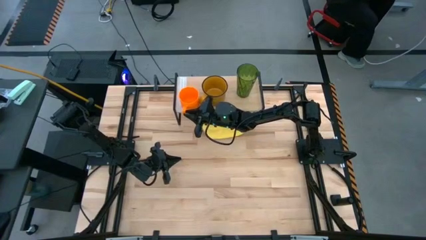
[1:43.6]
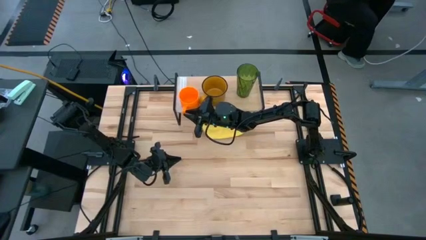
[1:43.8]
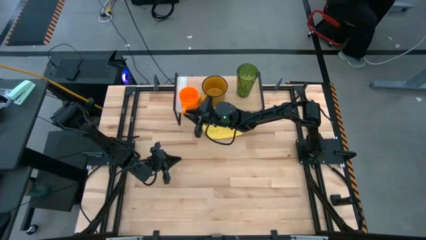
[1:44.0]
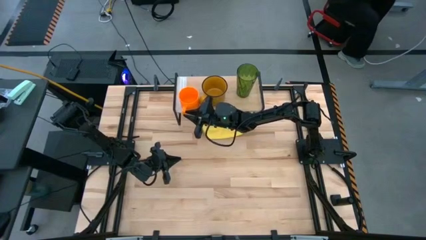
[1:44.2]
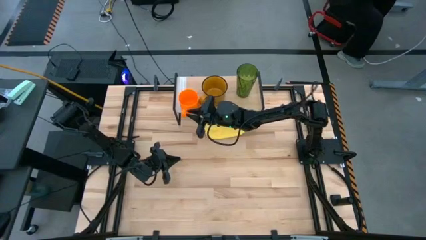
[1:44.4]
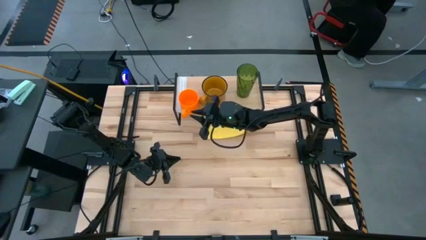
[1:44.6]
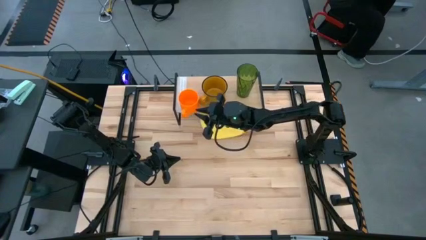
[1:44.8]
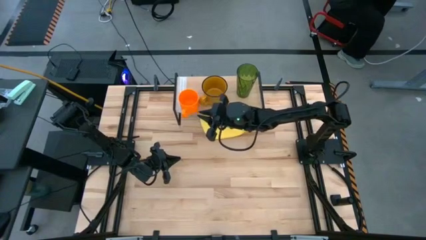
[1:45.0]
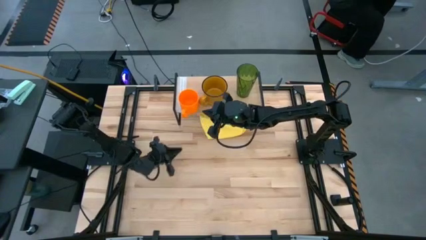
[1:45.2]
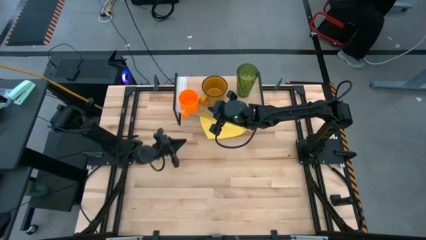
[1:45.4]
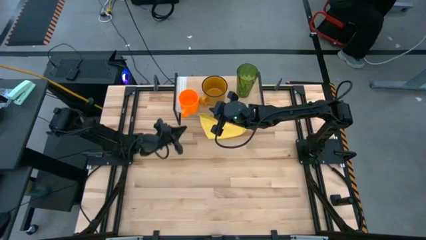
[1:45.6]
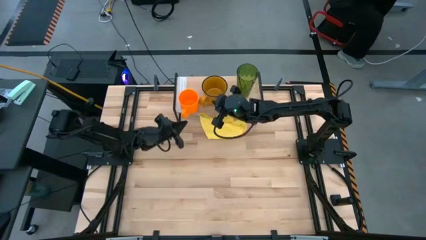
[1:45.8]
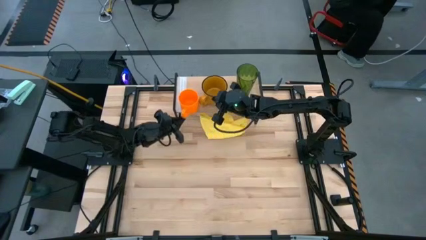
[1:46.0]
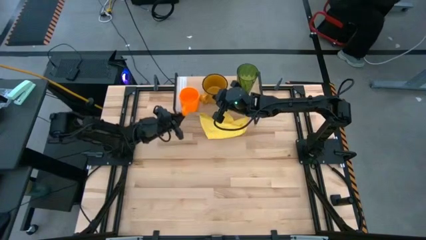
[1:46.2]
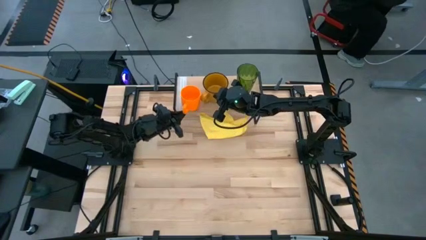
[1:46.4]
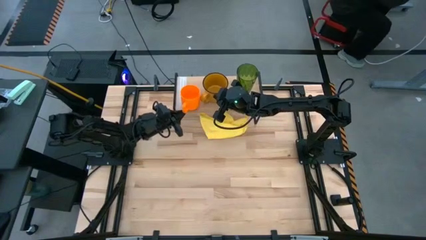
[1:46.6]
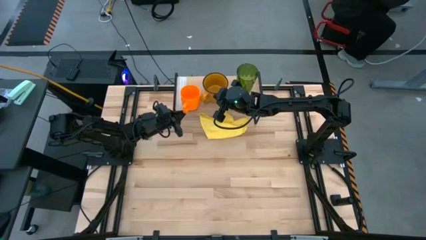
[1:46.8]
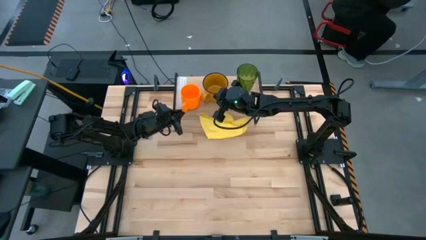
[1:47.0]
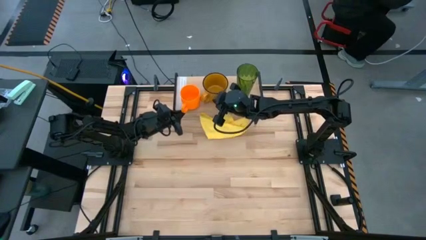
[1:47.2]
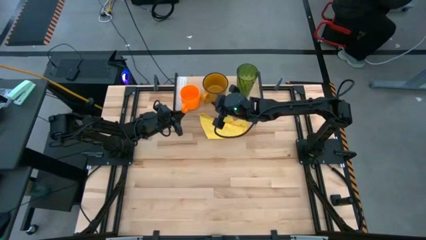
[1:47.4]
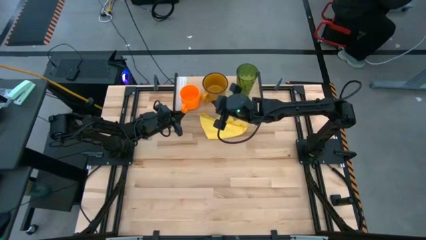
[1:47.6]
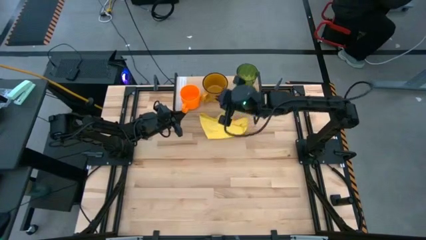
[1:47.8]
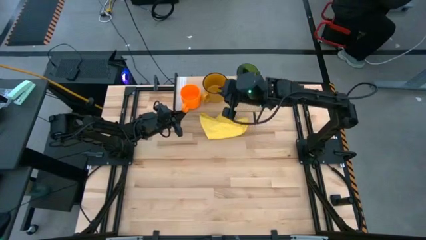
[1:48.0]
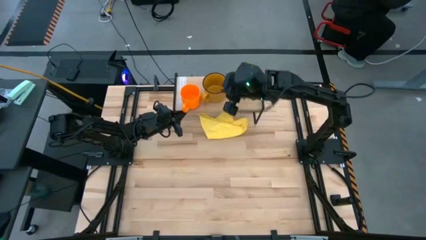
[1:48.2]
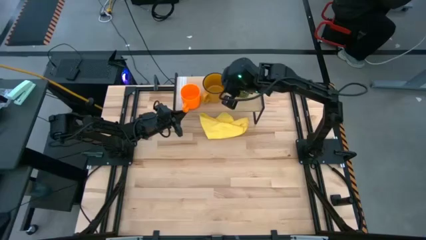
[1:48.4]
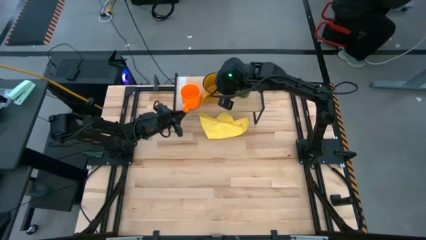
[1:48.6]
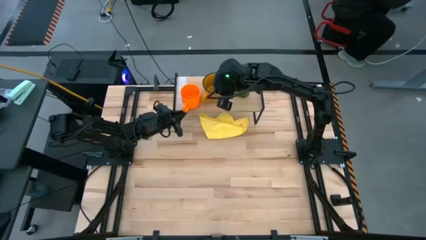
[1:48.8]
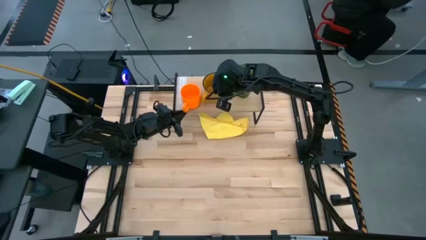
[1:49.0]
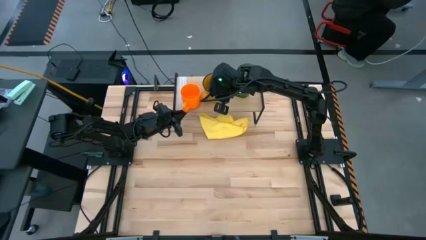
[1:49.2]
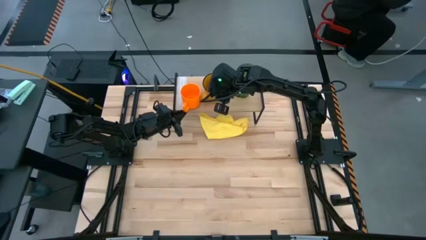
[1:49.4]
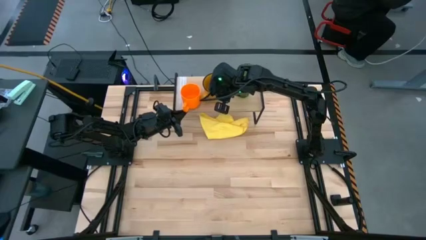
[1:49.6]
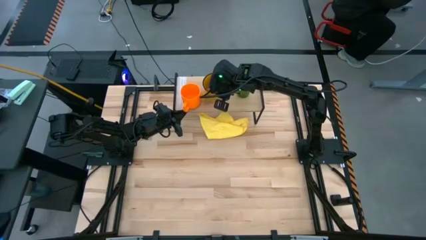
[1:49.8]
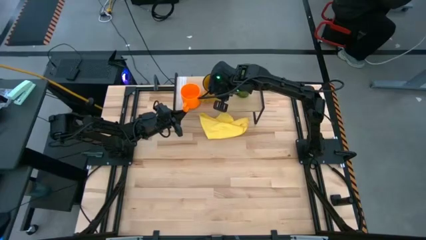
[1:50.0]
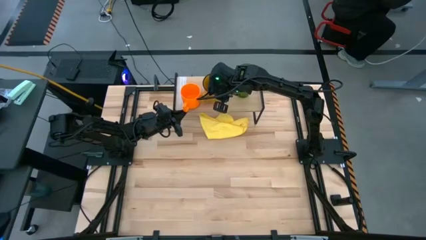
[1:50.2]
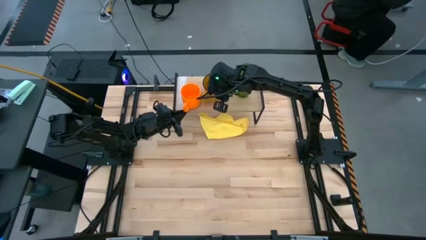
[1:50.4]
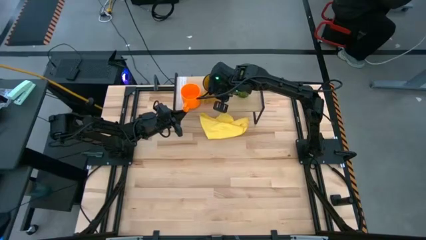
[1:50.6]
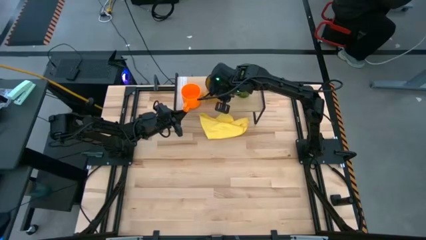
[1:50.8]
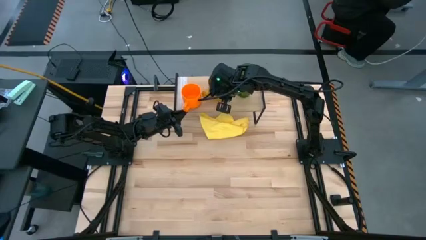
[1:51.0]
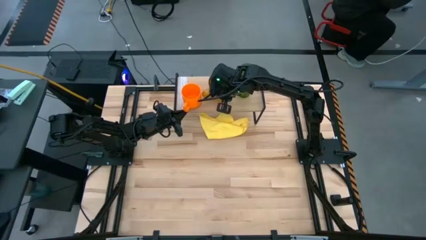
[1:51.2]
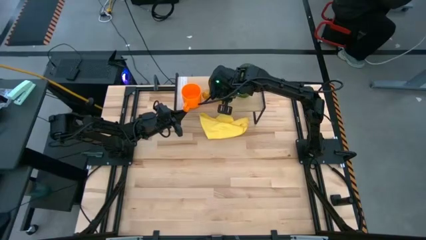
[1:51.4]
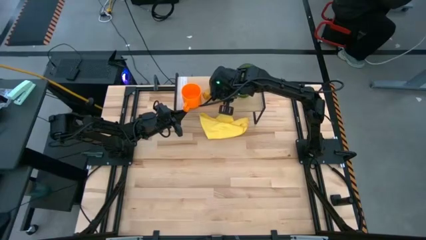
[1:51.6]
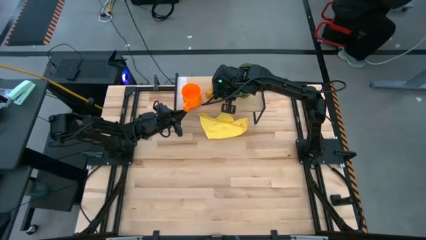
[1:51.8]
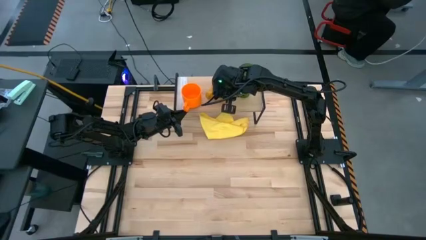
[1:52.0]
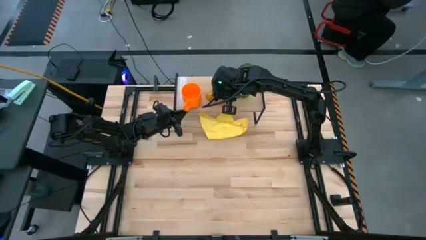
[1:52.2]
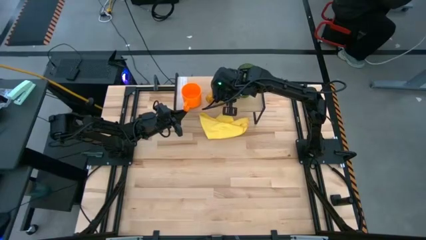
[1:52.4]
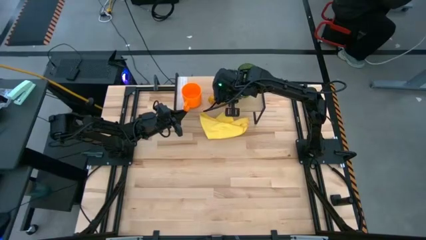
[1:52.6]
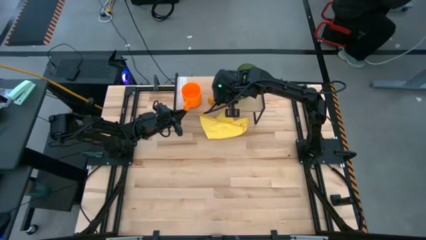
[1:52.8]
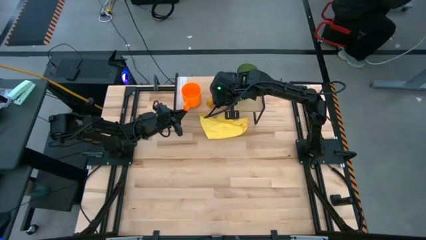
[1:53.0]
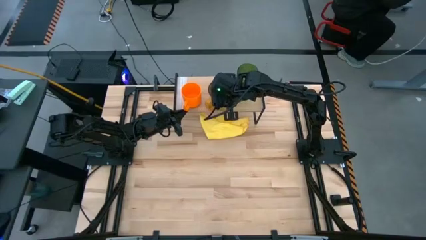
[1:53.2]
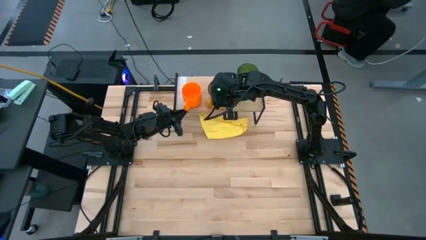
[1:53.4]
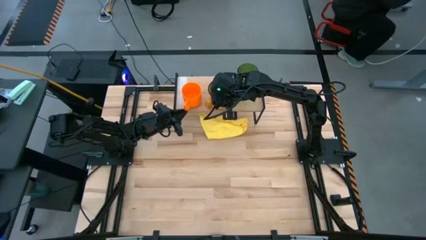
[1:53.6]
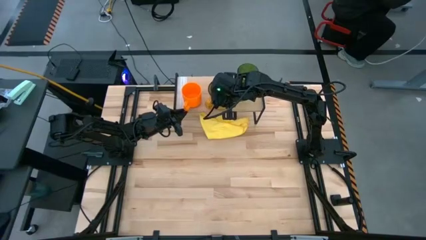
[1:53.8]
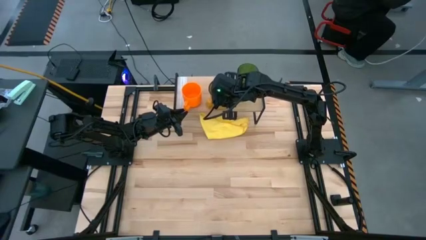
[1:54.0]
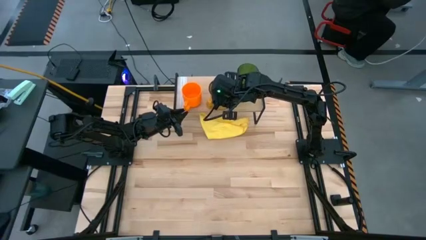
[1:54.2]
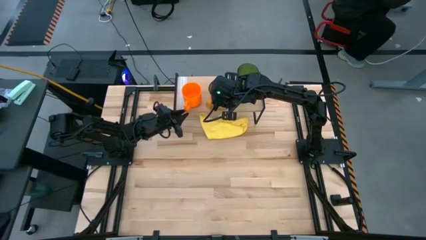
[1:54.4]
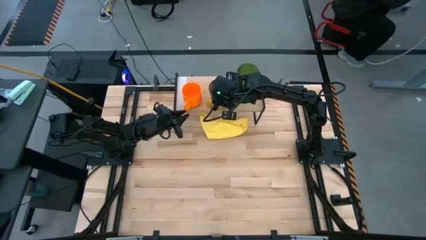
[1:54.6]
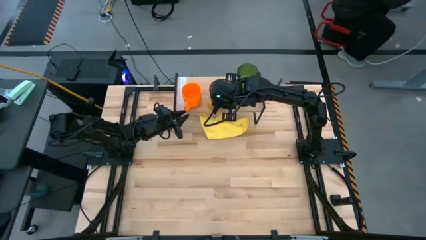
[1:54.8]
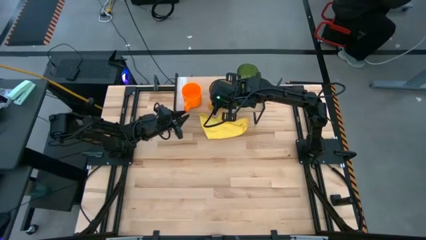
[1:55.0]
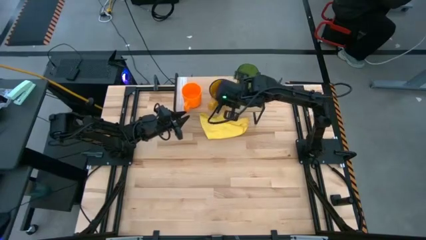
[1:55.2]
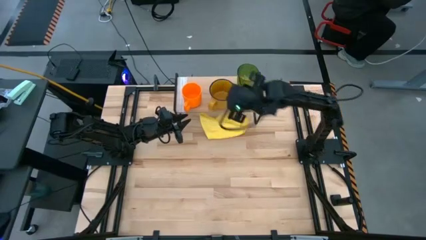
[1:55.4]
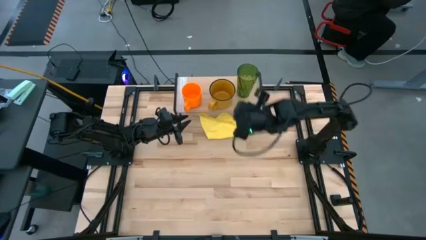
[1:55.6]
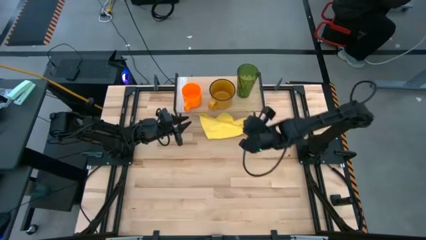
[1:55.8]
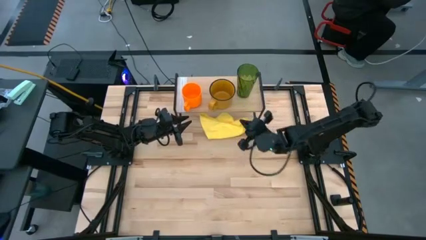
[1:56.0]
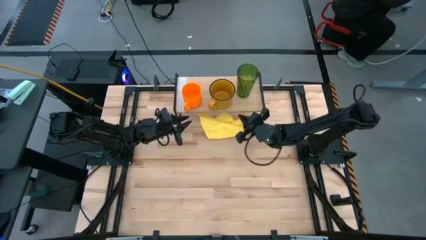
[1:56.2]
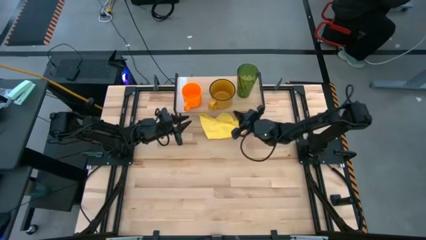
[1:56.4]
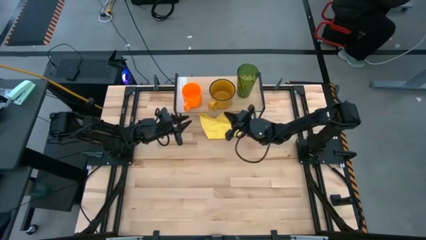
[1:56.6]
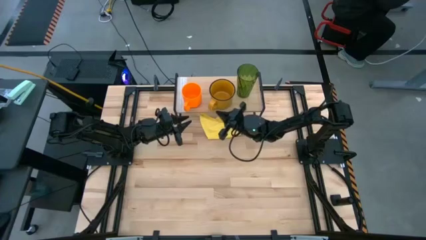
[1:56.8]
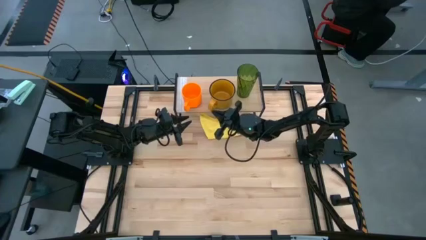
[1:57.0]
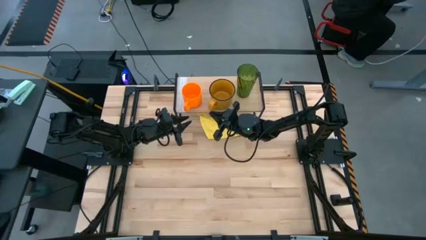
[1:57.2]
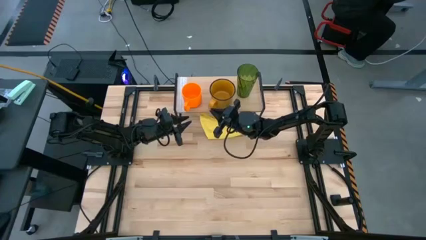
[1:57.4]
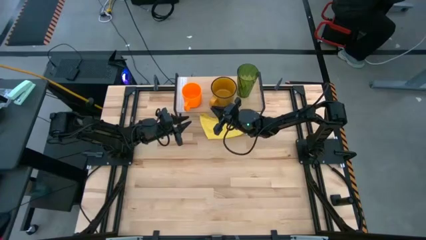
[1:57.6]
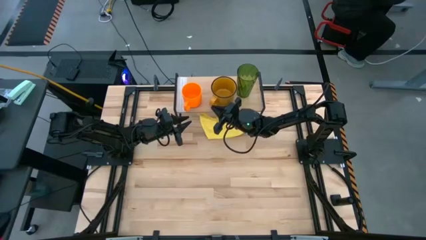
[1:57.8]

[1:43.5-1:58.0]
Task: Stack small to large cups/mugs on shelf
Adjust the orange mug and yellow mug
